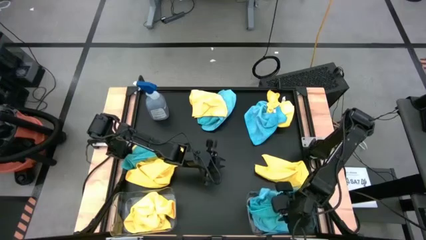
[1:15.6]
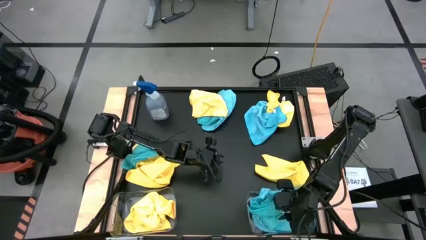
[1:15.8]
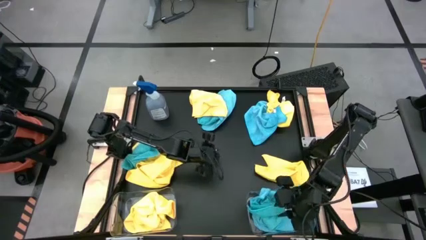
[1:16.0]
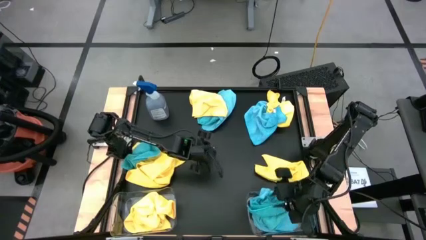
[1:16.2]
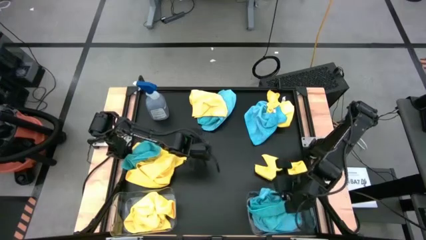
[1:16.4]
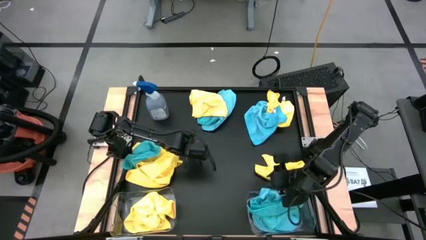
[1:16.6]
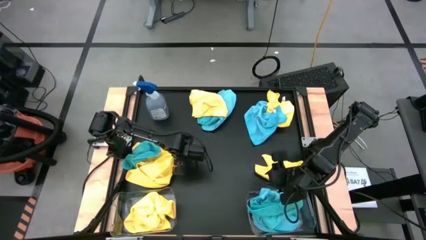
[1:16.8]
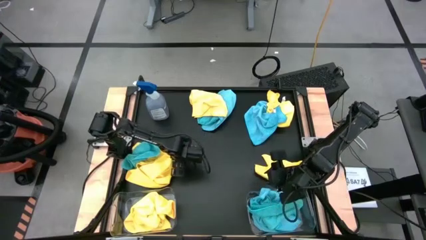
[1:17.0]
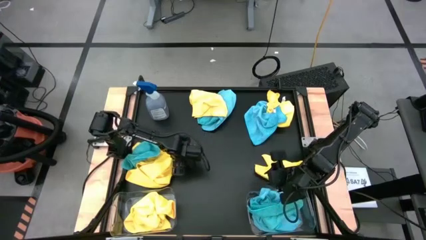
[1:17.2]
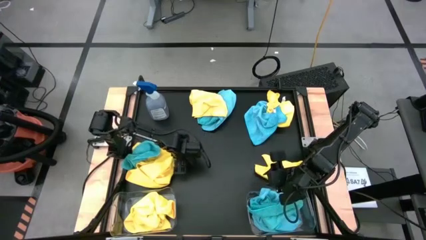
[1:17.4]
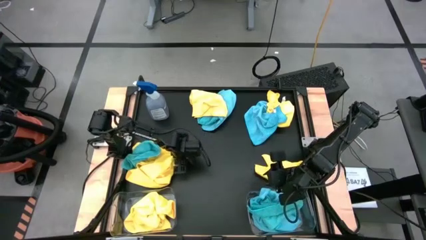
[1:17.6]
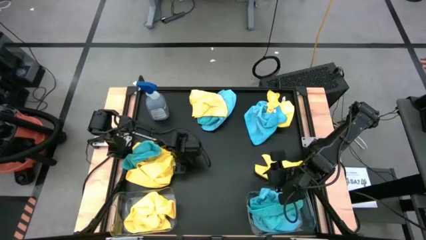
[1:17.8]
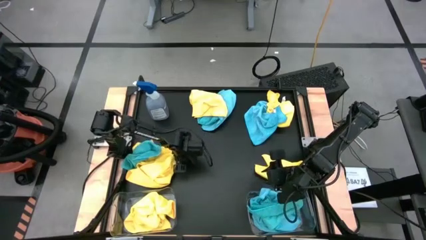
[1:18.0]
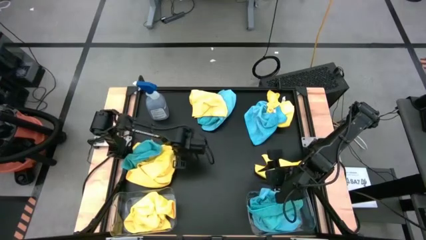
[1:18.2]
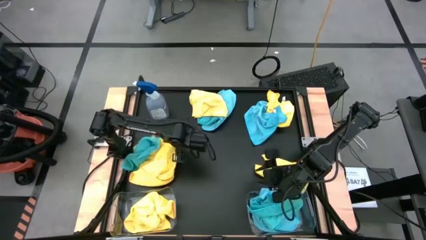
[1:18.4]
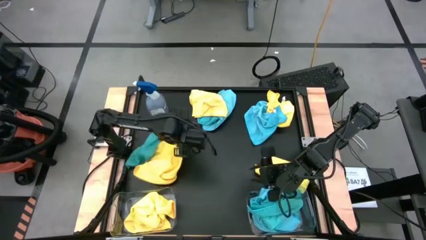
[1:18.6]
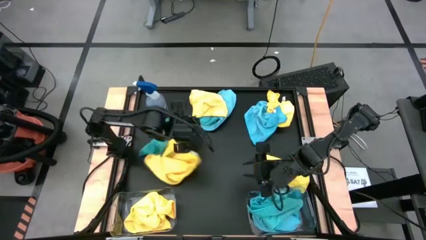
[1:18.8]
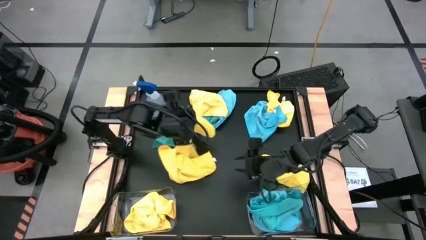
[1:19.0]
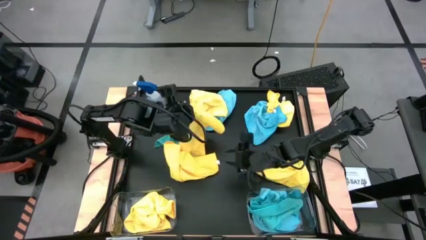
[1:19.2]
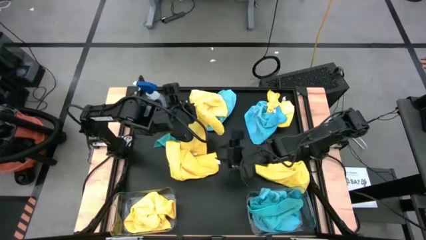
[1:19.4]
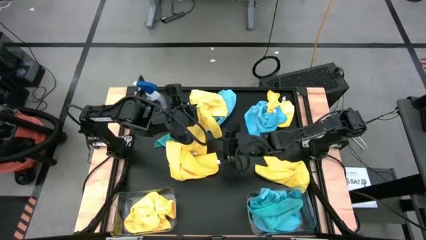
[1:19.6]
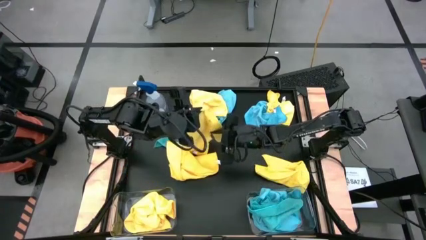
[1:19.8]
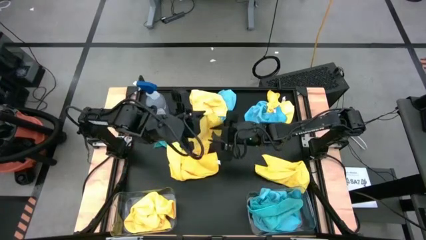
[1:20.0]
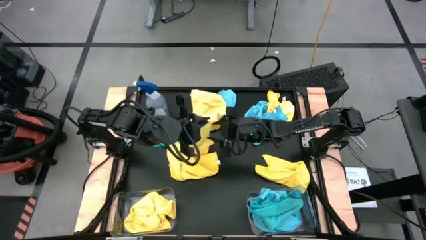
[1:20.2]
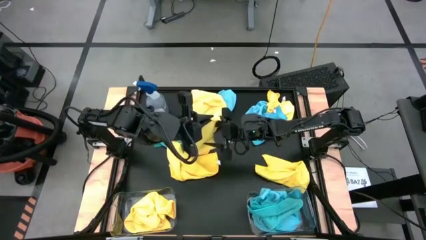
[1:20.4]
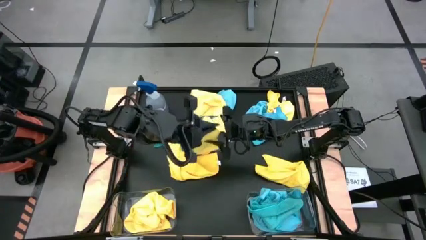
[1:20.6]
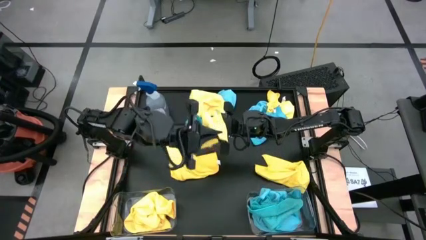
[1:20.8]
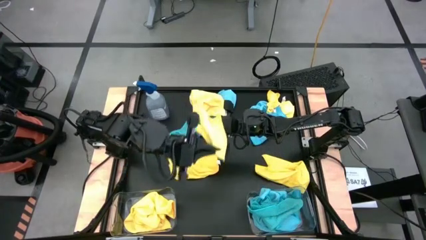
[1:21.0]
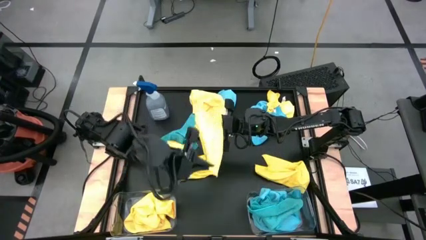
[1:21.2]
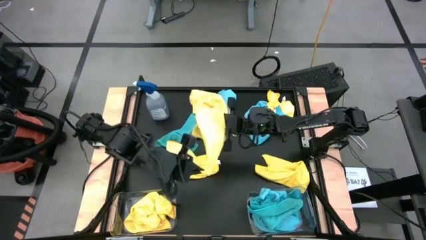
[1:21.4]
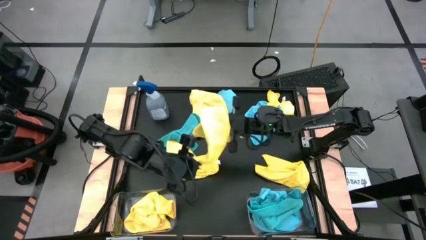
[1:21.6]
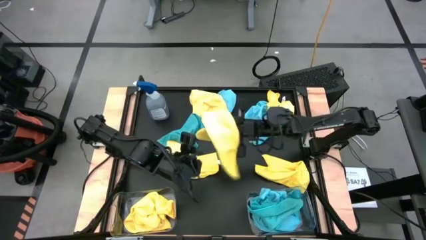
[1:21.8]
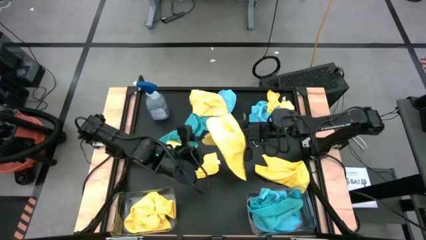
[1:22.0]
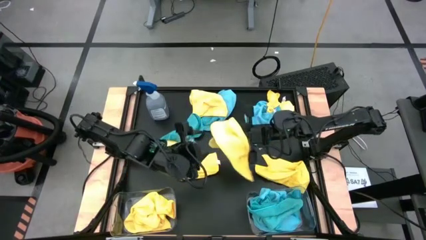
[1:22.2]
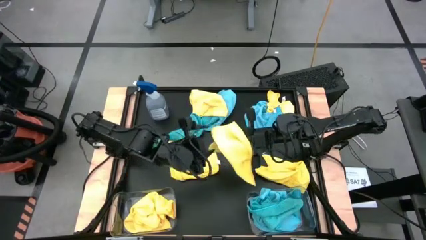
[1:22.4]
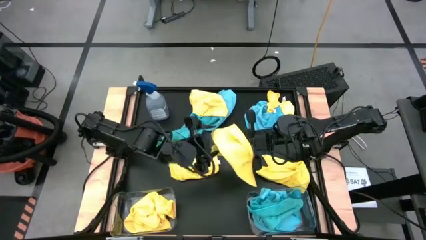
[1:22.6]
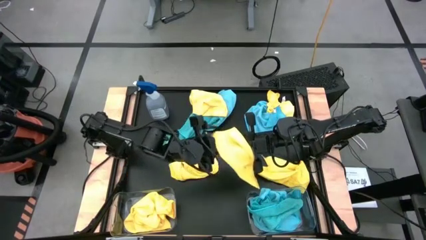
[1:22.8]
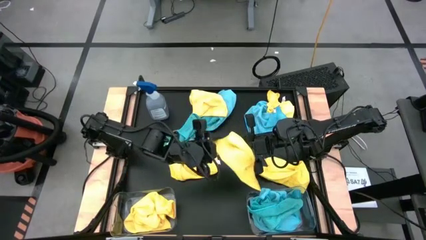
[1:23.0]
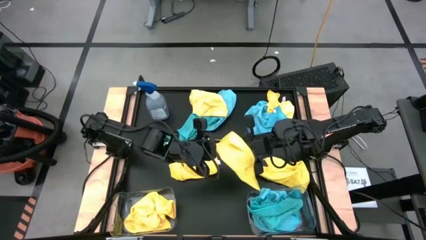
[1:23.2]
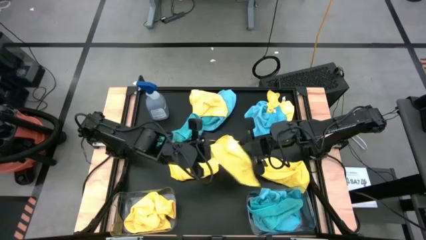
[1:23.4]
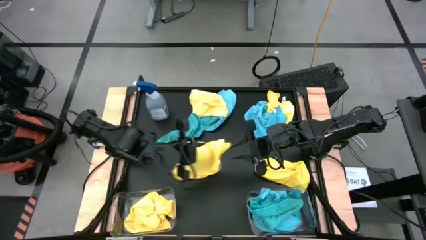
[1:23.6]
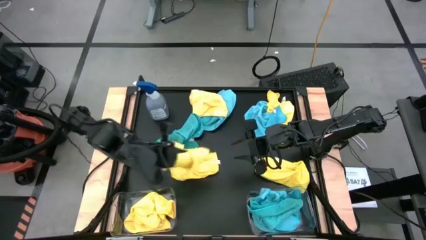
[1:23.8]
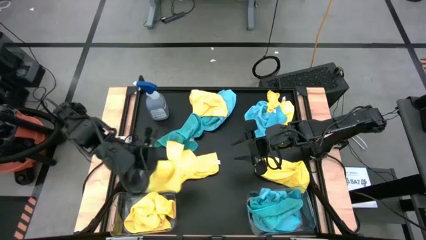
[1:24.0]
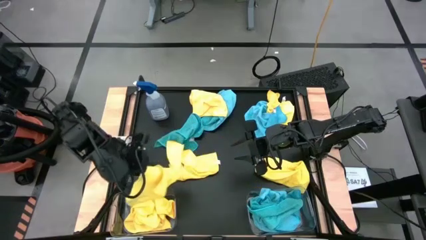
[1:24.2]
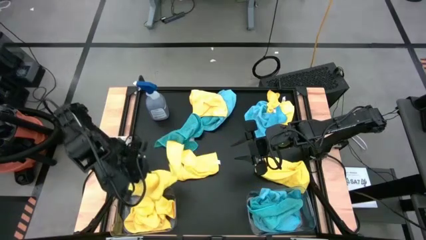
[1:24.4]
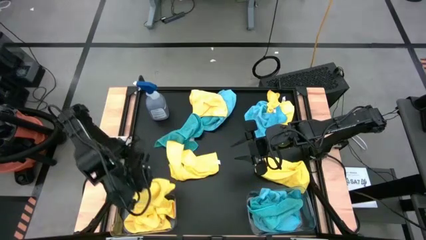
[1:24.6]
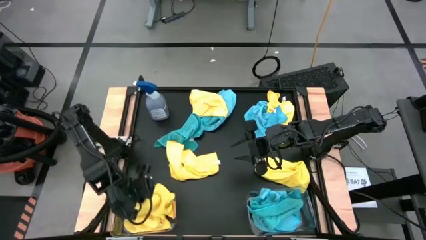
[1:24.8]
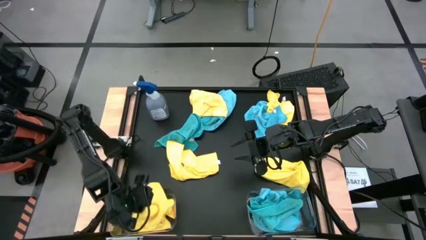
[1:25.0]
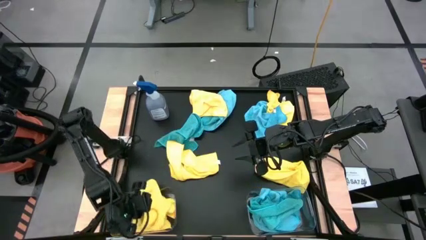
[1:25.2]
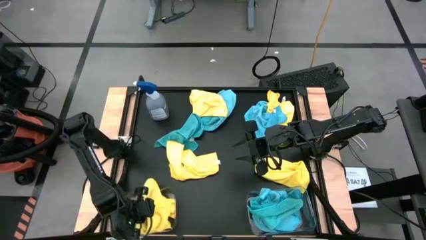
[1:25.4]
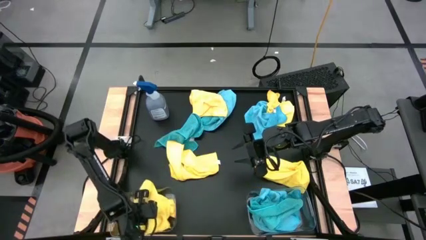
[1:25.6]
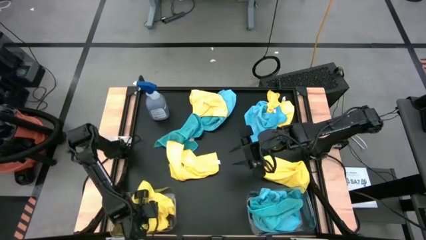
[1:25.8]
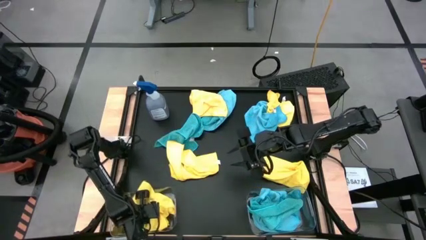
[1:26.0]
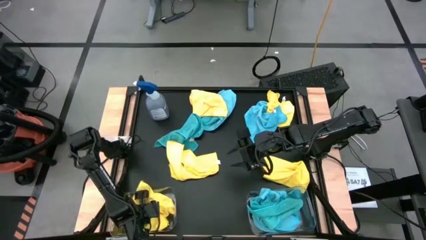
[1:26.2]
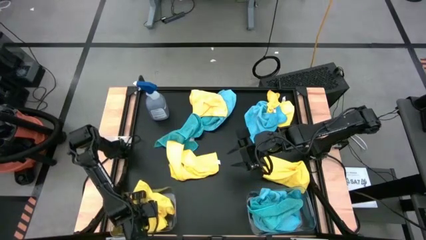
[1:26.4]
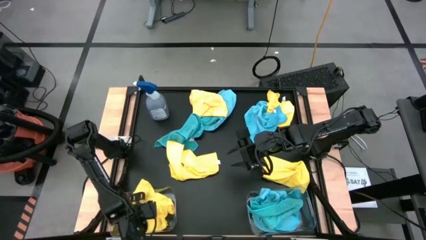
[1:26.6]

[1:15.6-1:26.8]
Task: Sort microfiber towel by color & place in baskets
Put the yellow towel into the left transparent bin
